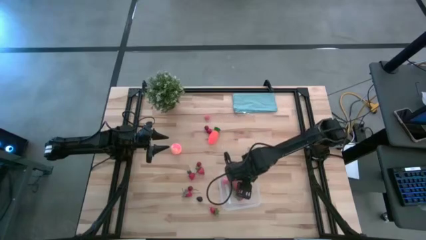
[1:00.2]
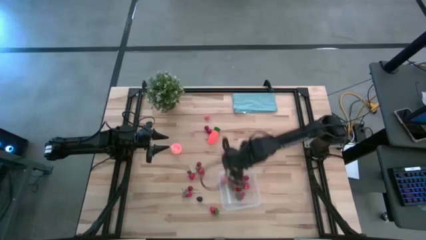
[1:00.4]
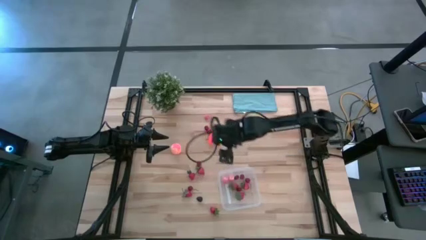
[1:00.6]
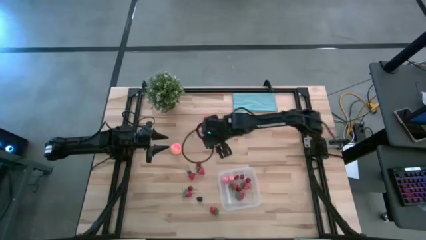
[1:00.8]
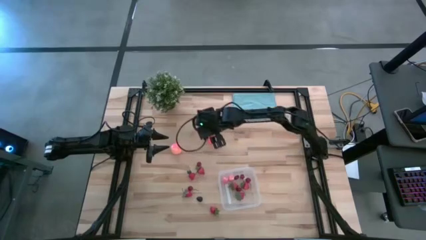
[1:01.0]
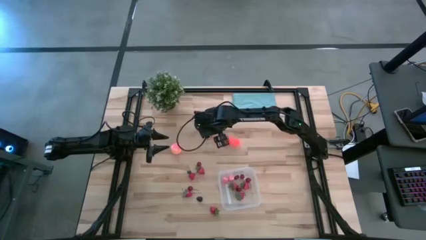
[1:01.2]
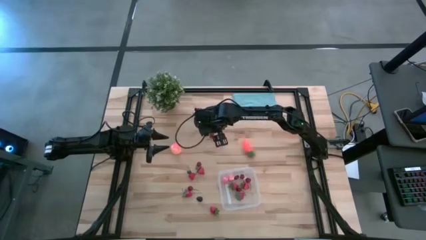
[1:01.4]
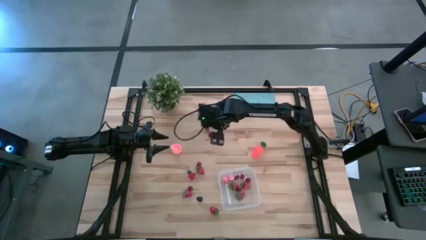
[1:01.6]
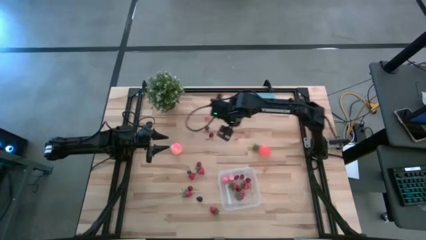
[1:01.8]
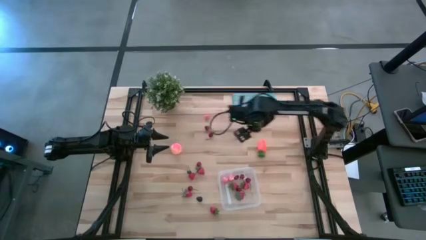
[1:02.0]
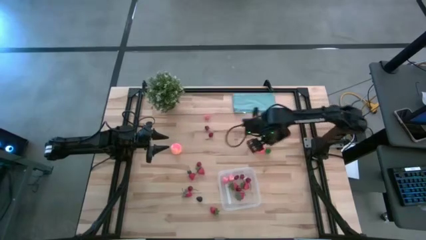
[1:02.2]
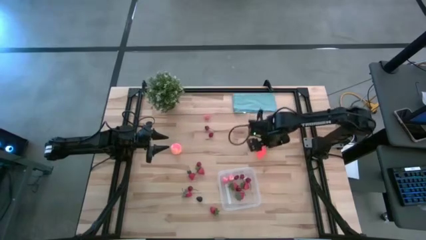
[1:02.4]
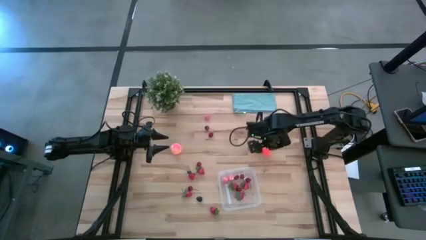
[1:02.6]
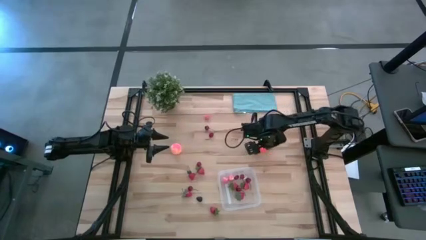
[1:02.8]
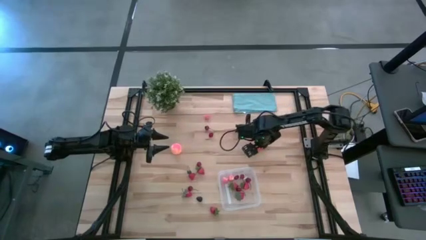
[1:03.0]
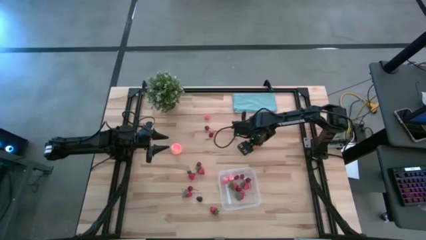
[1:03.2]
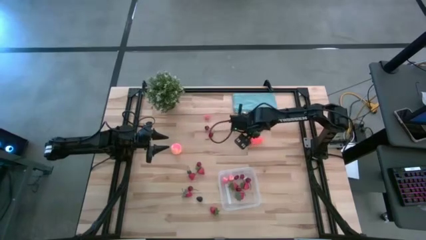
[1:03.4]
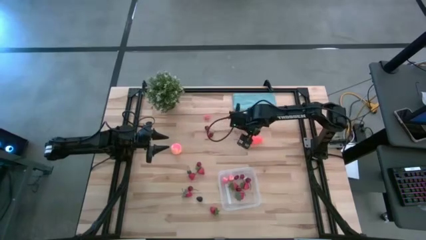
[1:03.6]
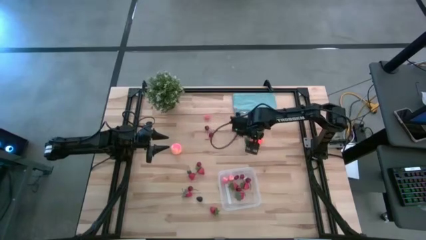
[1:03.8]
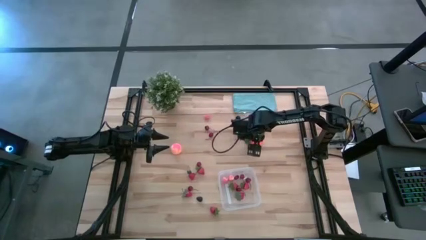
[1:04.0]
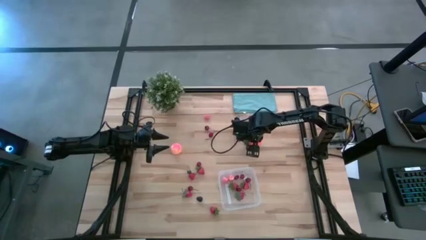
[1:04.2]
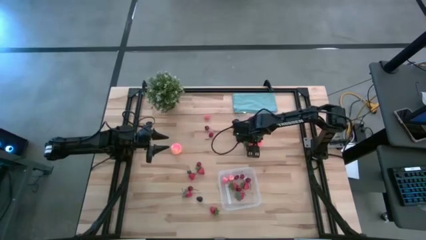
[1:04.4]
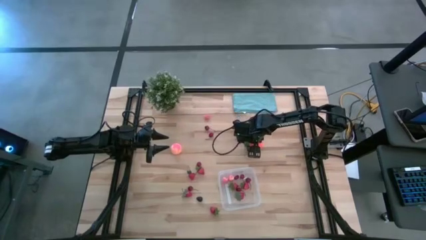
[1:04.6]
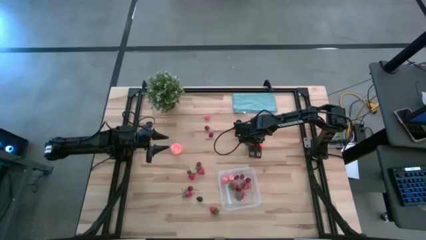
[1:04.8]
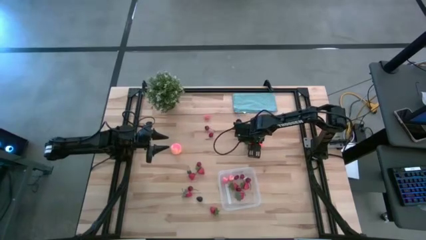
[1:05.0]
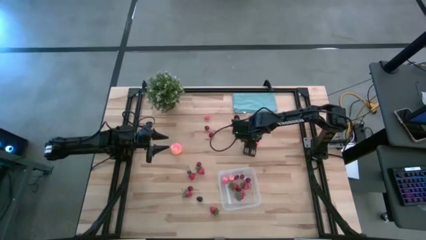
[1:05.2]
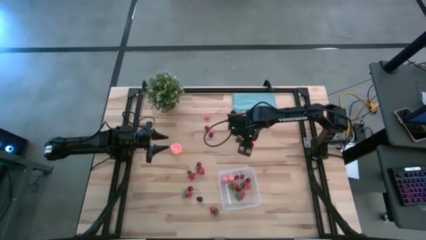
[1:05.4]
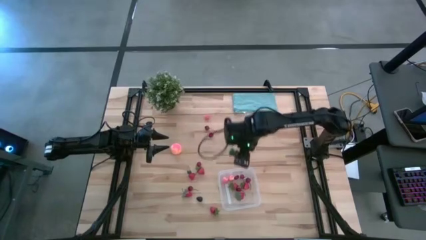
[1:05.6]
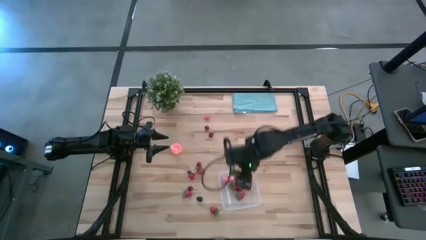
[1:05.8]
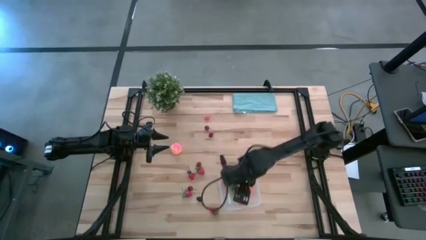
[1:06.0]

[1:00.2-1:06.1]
Task: Pick and placing Produce into tupperware
Put the orange carrot into the transparent container

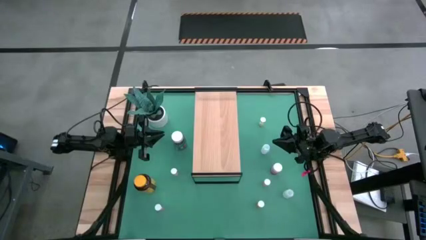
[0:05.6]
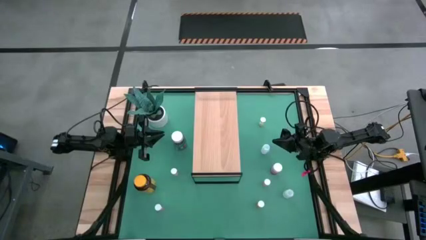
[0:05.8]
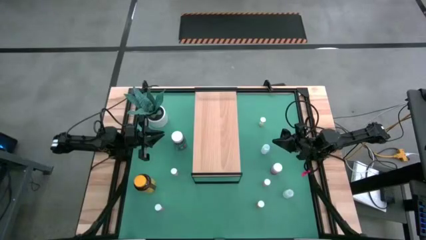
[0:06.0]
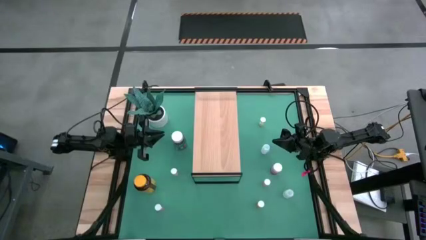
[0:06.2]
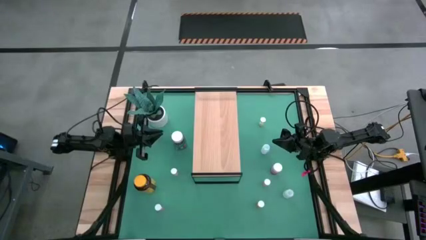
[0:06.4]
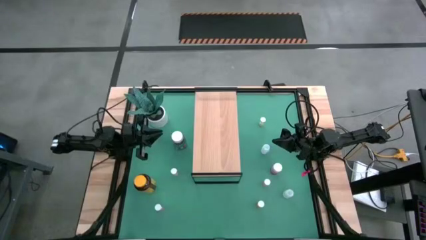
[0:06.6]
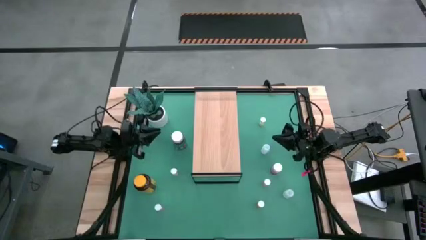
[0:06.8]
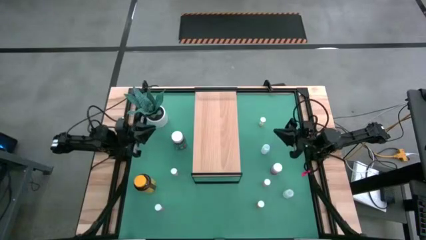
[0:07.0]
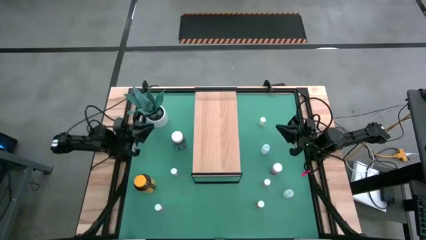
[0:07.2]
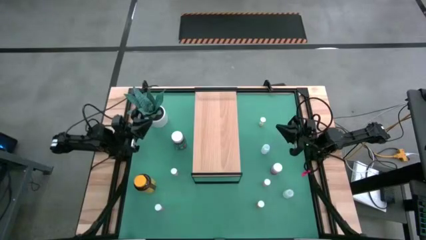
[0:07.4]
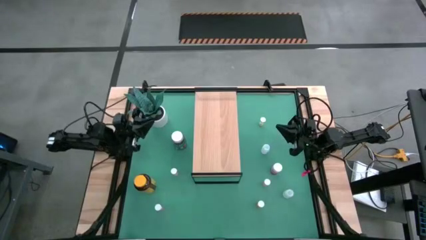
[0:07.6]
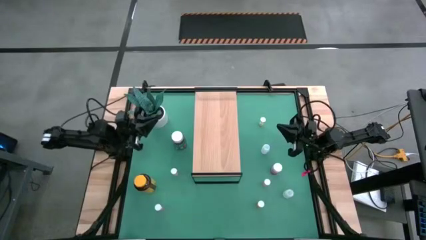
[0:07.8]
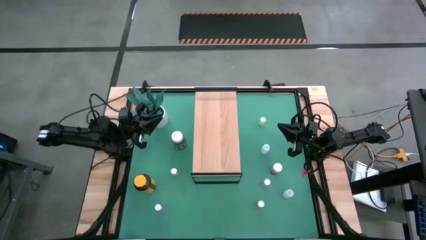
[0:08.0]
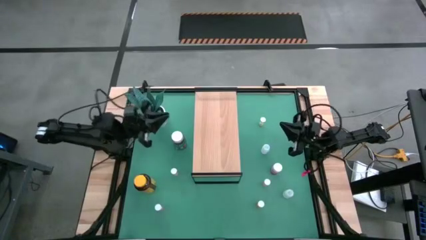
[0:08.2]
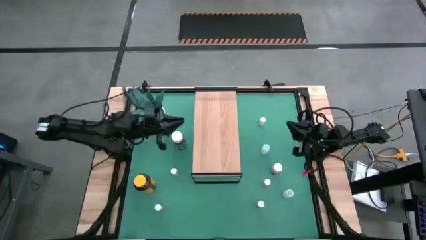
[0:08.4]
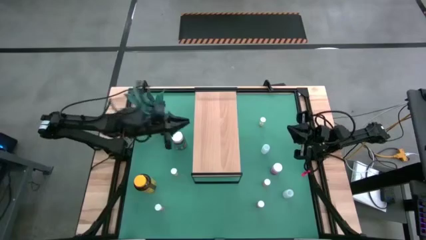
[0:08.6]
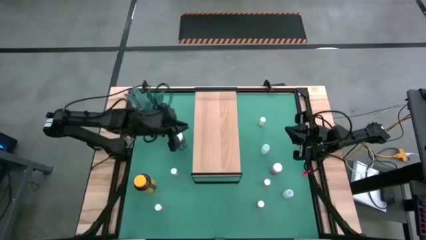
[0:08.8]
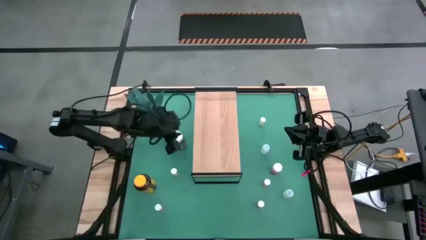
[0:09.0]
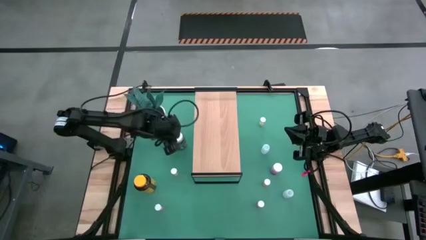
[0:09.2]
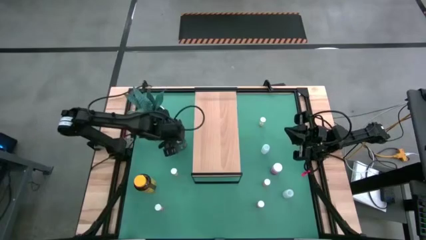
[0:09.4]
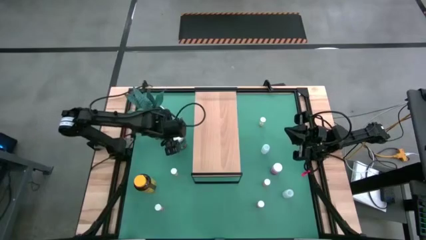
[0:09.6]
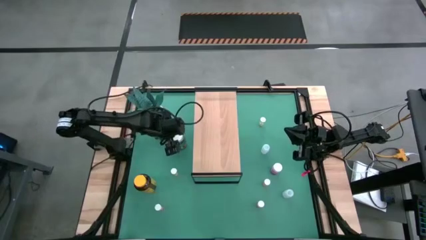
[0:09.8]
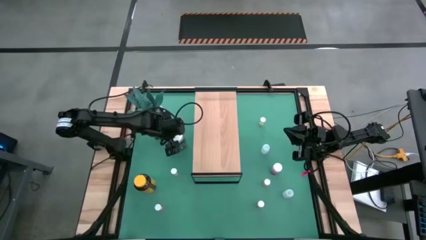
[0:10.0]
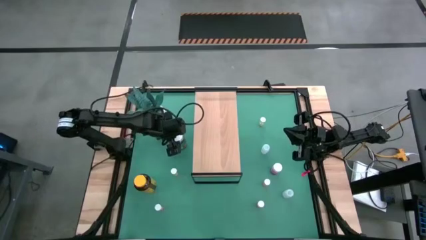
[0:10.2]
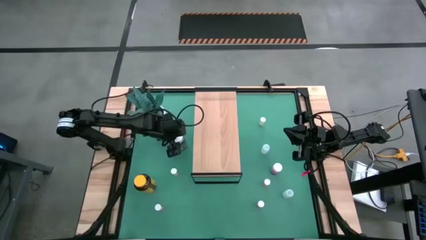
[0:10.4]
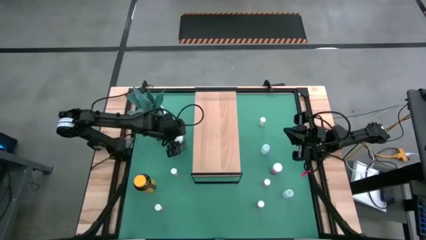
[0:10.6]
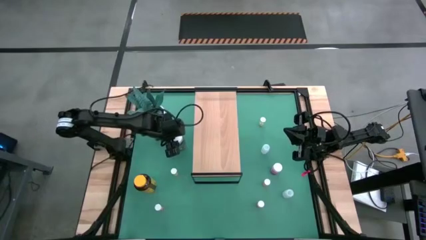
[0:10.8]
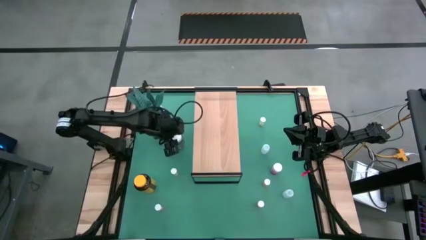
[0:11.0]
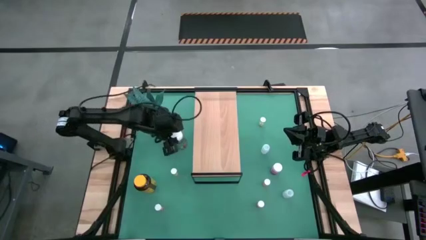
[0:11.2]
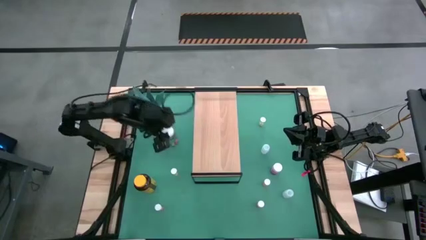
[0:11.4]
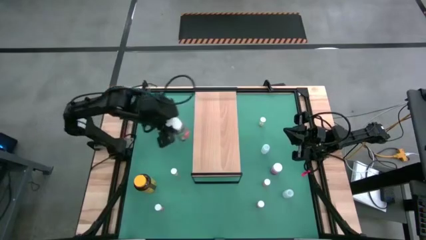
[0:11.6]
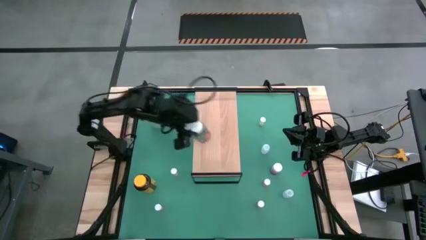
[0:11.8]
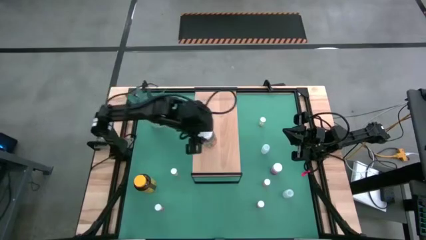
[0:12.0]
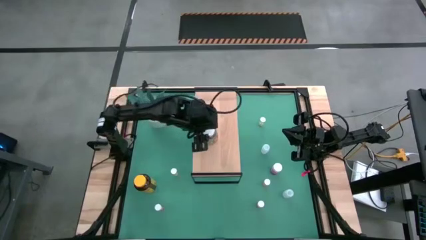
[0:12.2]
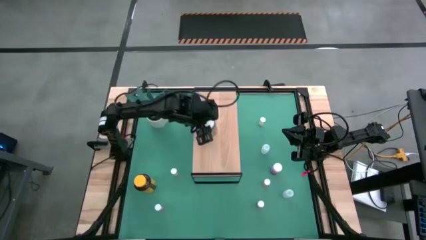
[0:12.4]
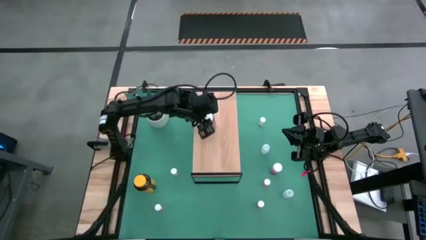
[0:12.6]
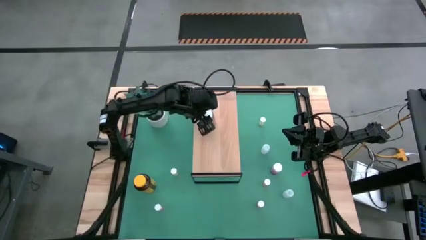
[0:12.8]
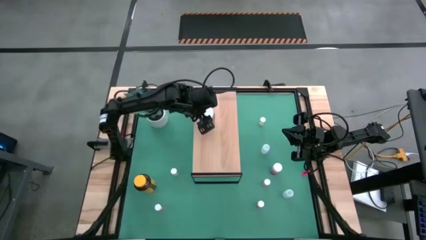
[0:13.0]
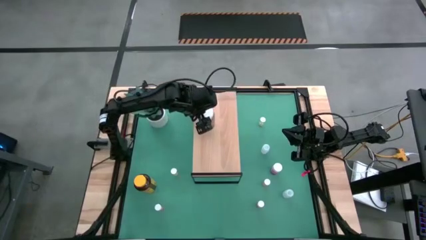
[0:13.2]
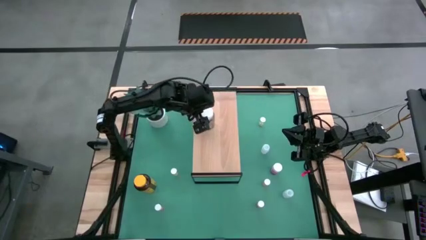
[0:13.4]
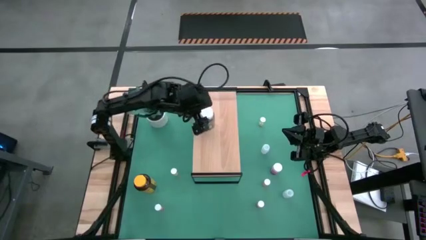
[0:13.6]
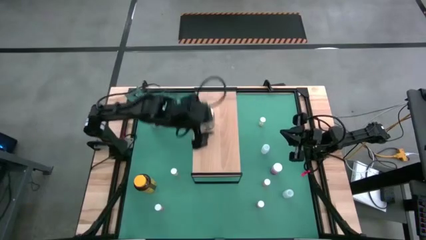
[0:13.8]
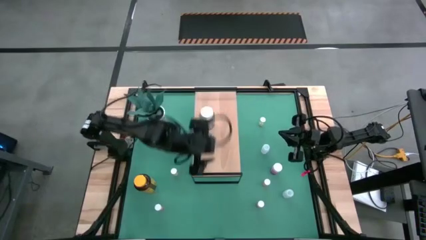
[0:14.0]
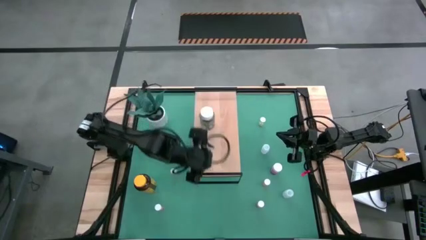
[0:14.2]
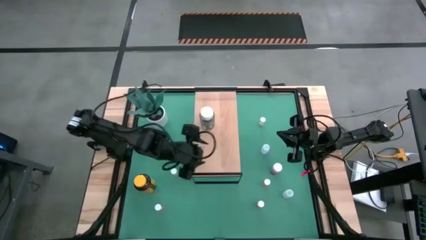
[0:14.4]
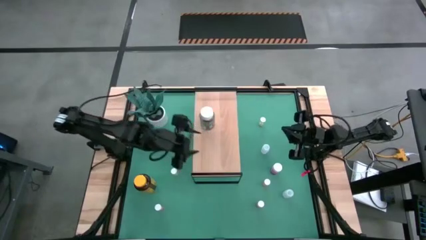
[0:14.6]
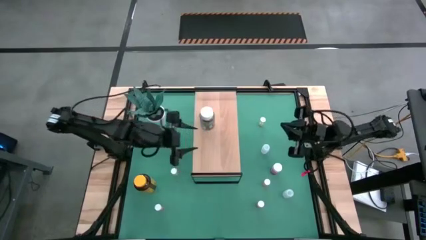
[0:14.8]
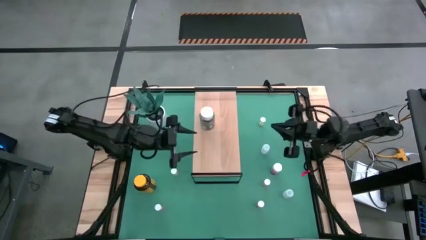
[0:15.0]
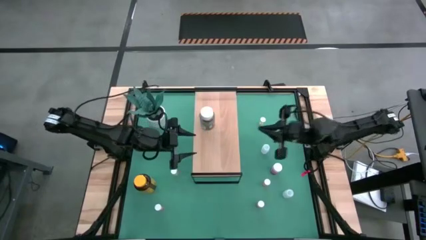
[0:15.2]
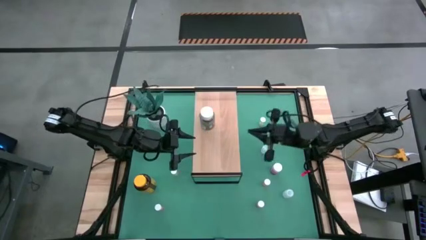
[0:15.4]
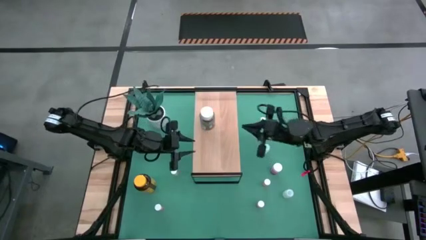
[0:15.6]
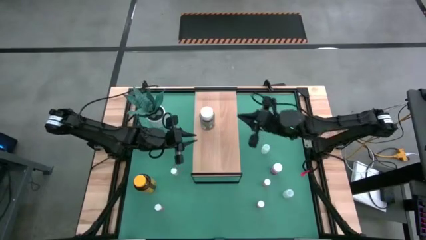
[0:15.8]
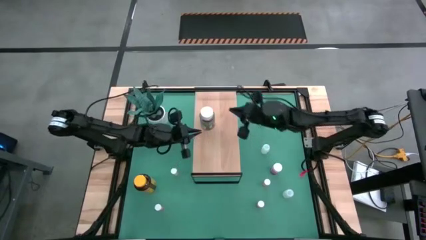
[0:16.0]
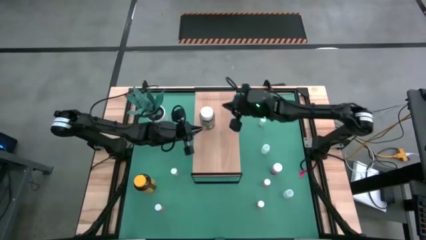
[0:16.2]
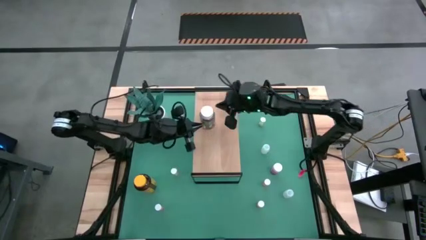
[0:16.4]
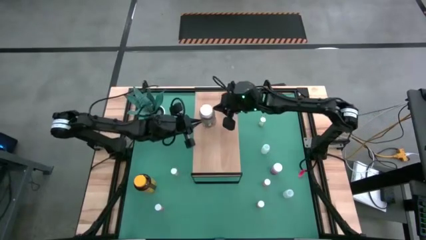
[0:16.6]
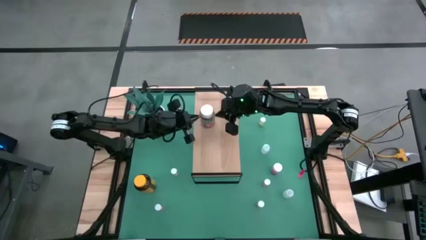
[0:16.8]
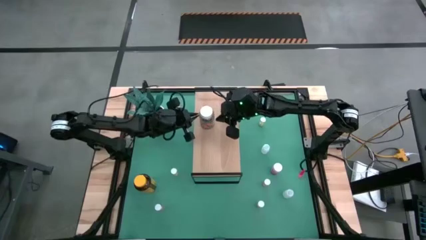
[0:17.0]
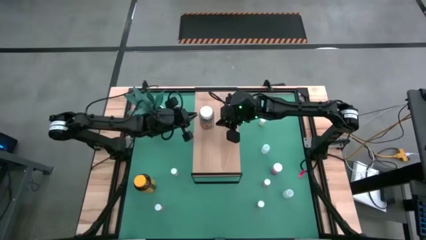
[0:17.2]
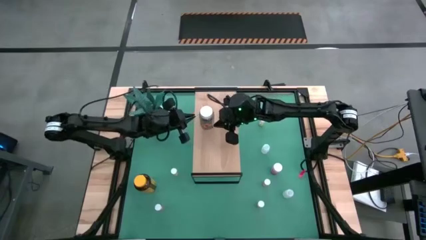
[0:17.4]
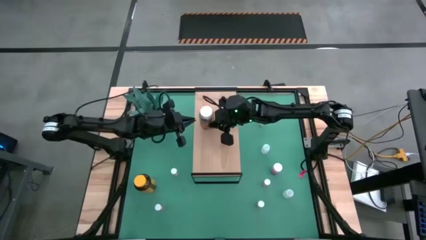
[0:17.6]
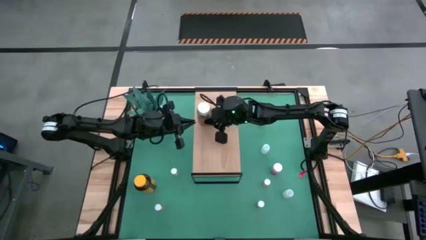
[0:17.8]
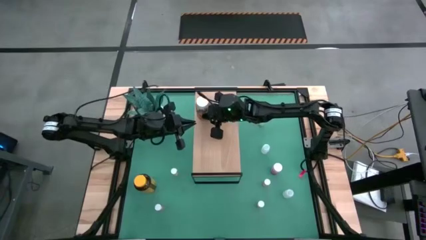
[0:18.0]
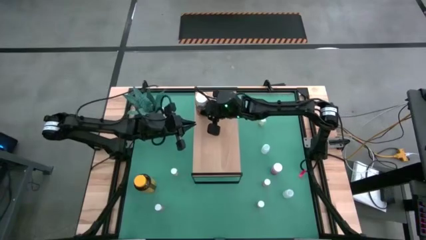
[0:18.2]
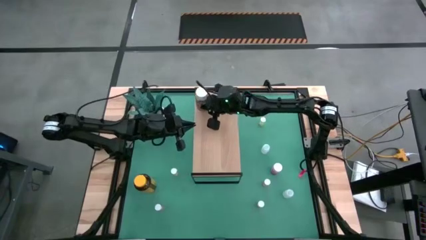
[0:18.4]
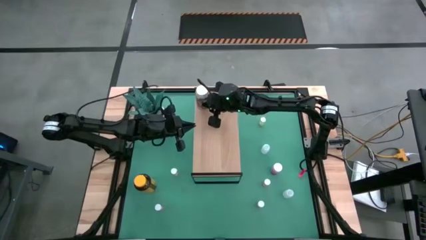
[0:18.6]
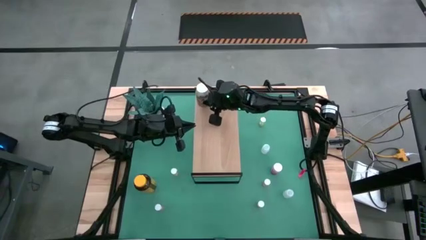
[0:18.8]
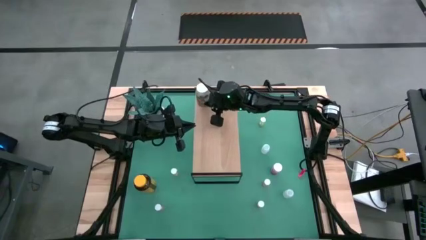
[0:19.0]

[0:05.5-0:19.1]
Task: Pick and place medicine bottles onto shelf by color
Put the green pill bottle on the shelf
